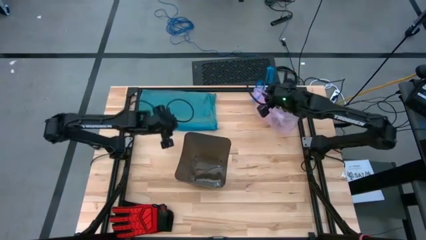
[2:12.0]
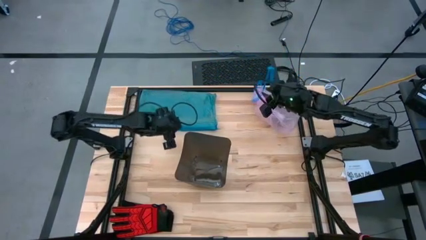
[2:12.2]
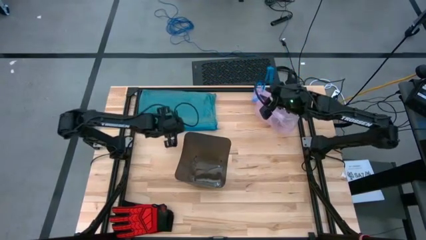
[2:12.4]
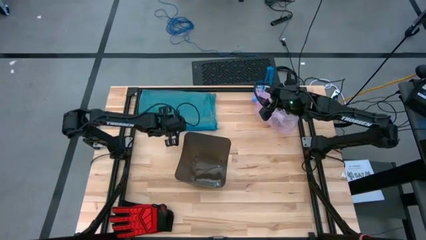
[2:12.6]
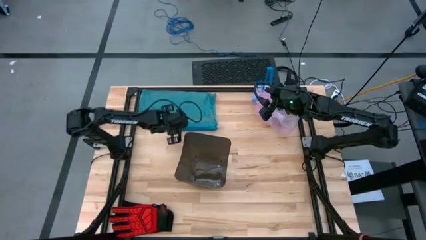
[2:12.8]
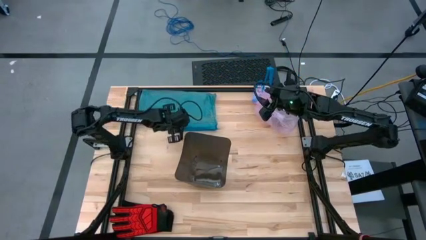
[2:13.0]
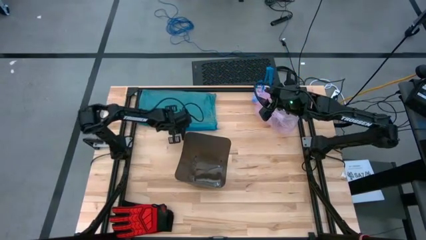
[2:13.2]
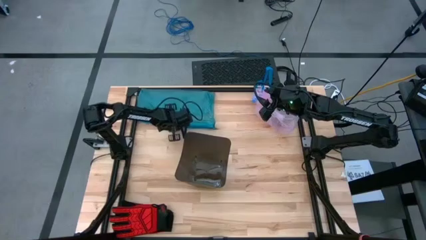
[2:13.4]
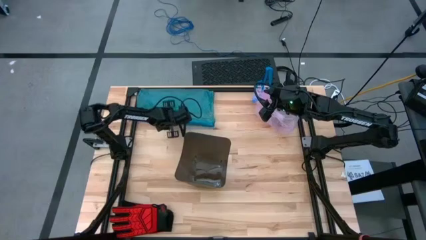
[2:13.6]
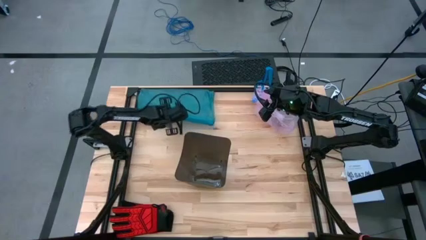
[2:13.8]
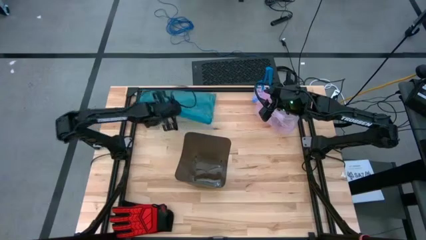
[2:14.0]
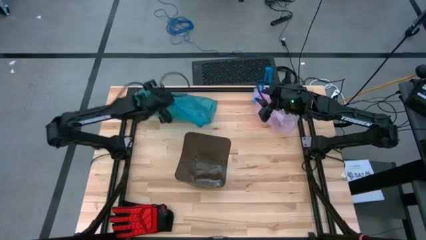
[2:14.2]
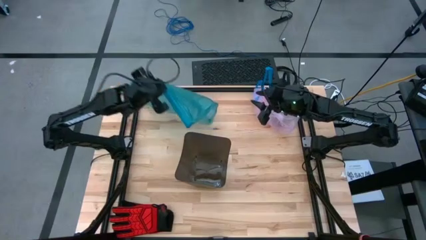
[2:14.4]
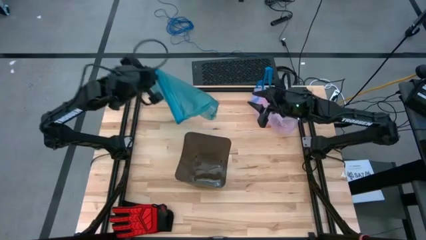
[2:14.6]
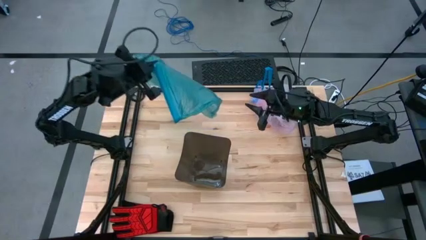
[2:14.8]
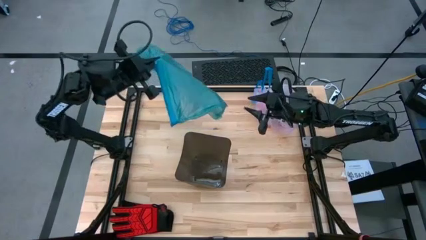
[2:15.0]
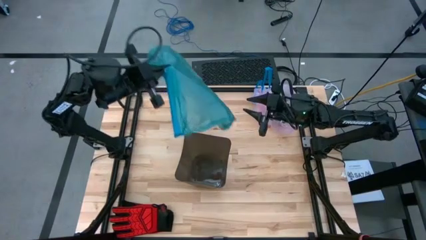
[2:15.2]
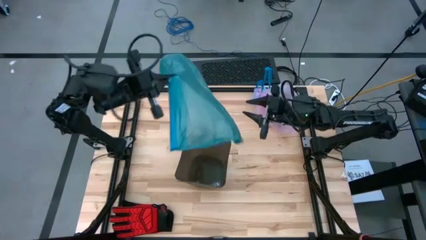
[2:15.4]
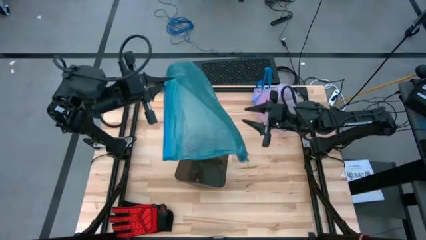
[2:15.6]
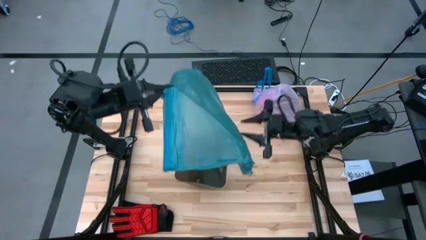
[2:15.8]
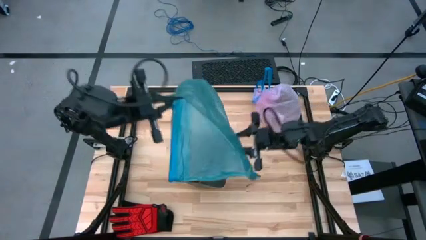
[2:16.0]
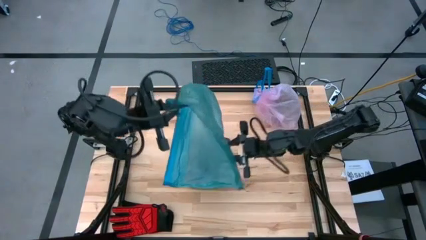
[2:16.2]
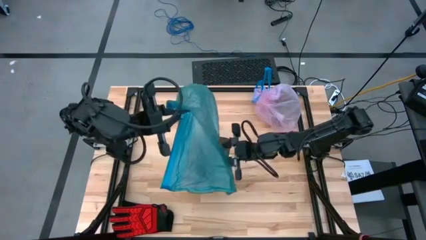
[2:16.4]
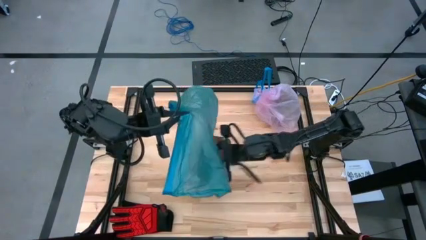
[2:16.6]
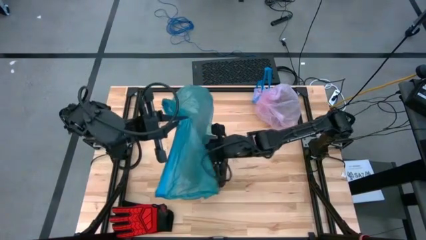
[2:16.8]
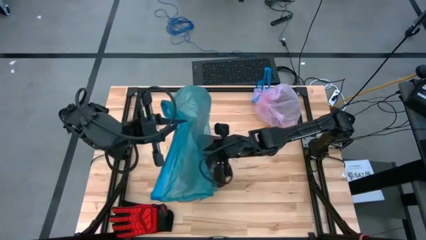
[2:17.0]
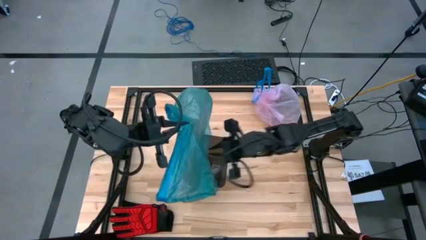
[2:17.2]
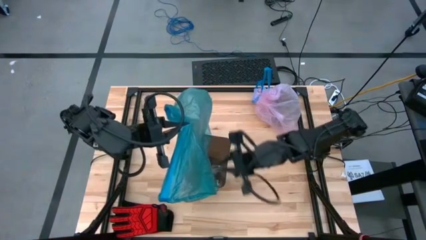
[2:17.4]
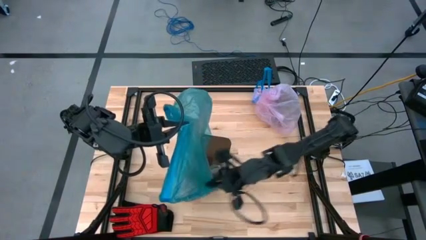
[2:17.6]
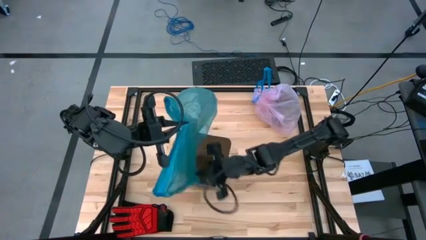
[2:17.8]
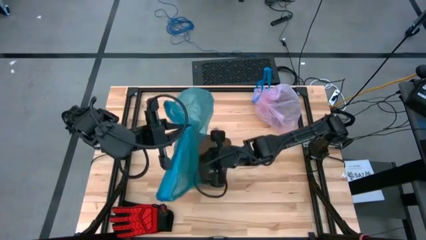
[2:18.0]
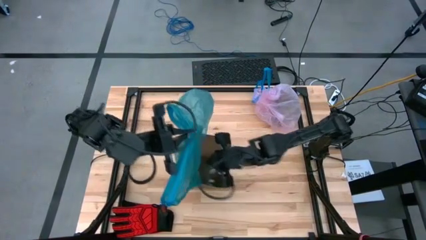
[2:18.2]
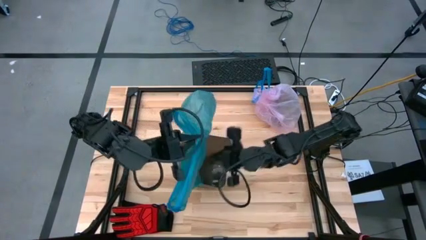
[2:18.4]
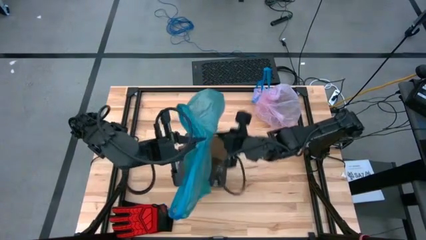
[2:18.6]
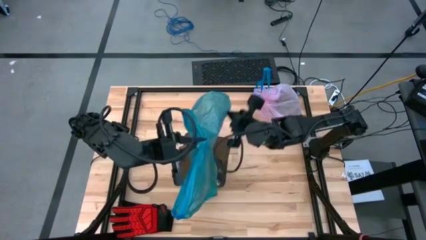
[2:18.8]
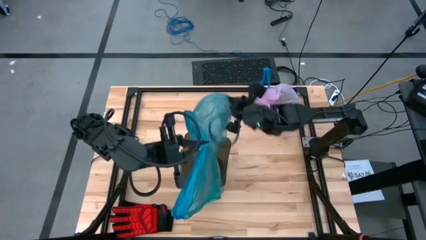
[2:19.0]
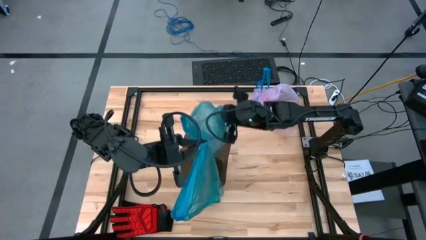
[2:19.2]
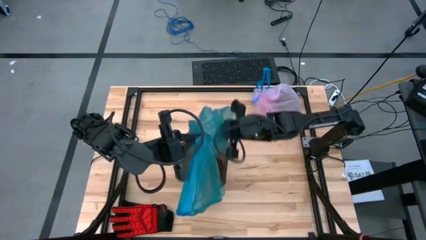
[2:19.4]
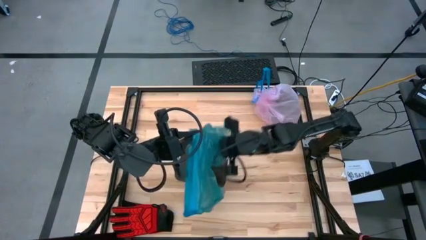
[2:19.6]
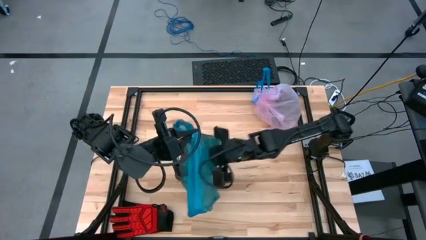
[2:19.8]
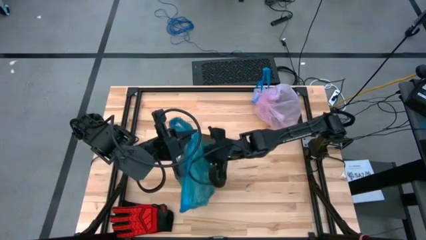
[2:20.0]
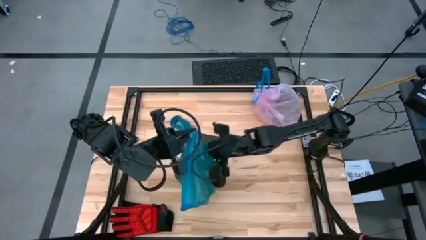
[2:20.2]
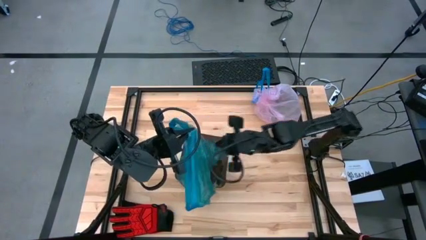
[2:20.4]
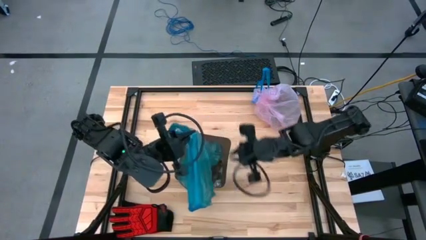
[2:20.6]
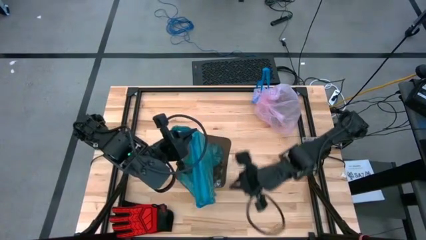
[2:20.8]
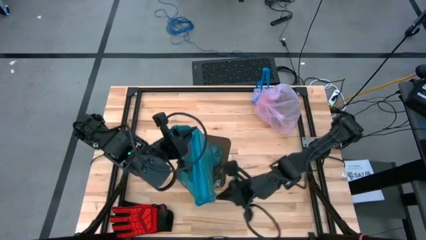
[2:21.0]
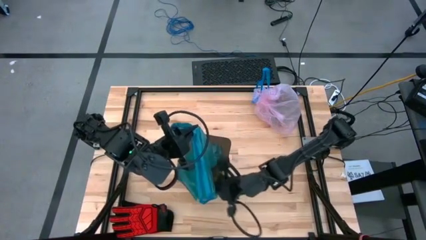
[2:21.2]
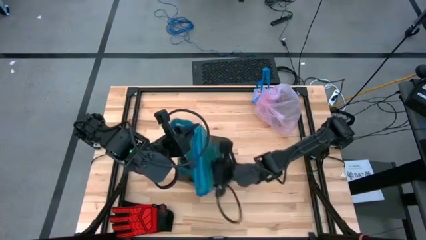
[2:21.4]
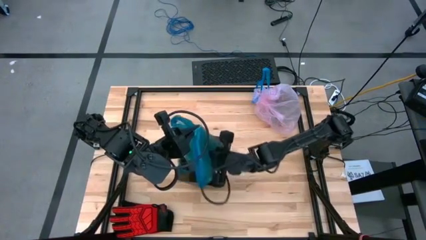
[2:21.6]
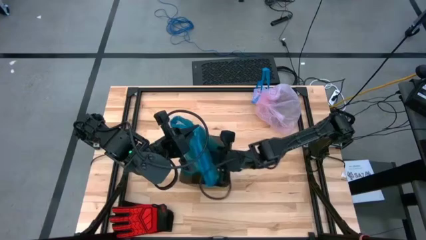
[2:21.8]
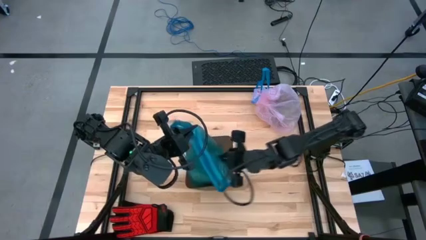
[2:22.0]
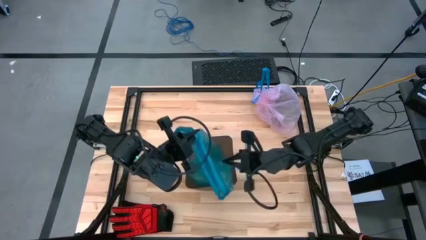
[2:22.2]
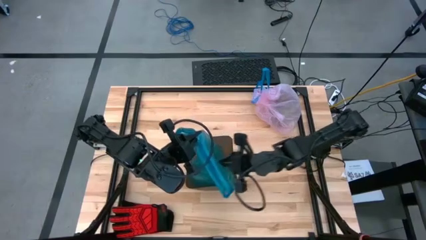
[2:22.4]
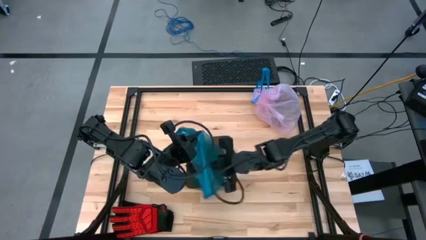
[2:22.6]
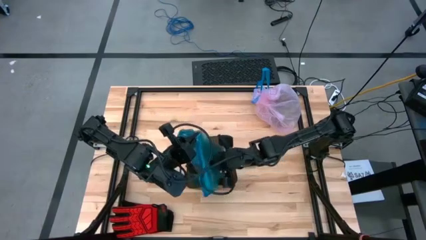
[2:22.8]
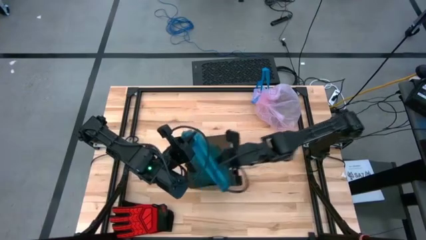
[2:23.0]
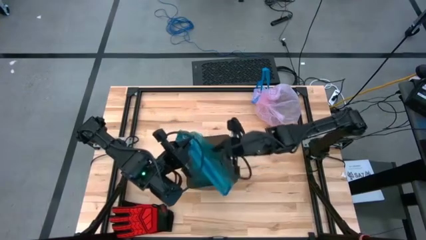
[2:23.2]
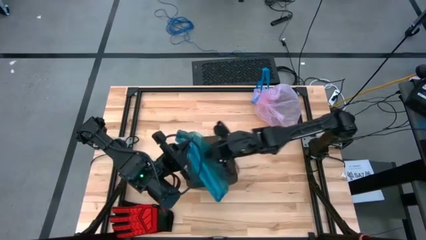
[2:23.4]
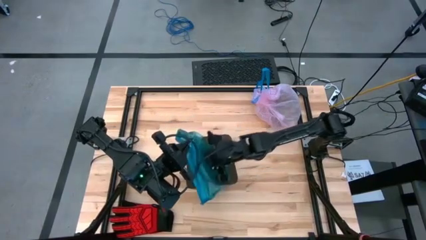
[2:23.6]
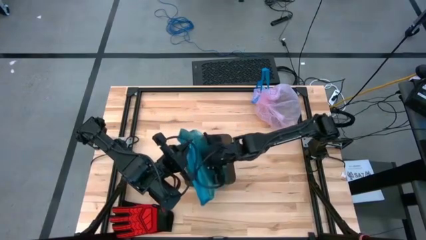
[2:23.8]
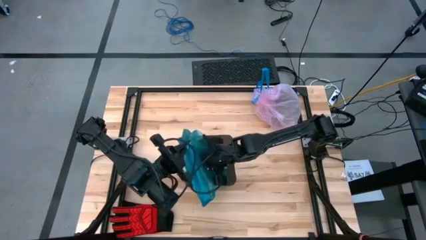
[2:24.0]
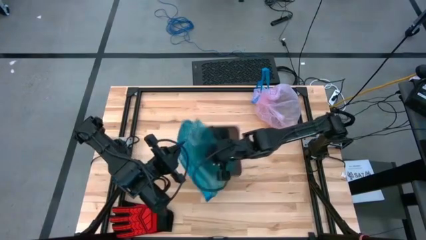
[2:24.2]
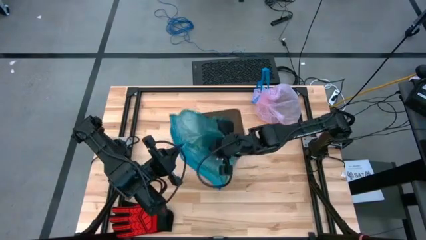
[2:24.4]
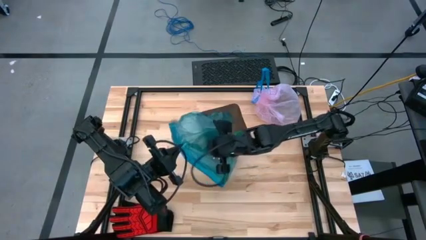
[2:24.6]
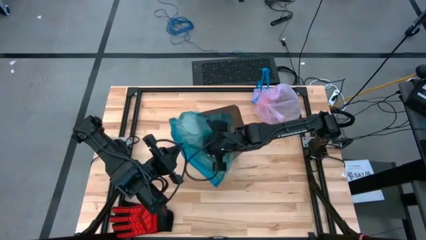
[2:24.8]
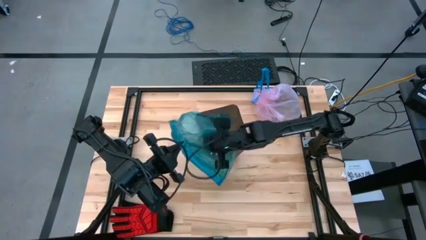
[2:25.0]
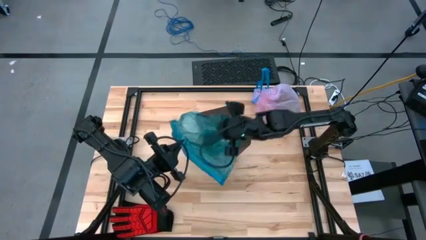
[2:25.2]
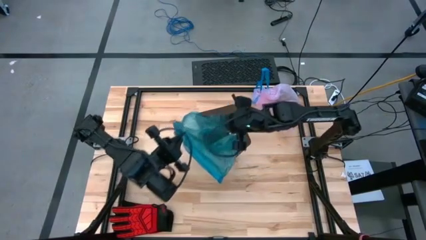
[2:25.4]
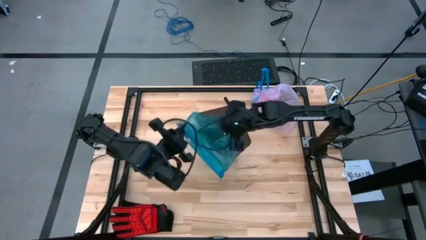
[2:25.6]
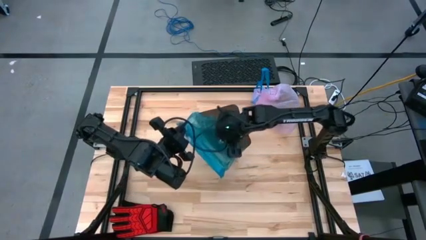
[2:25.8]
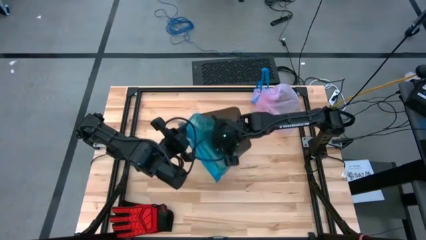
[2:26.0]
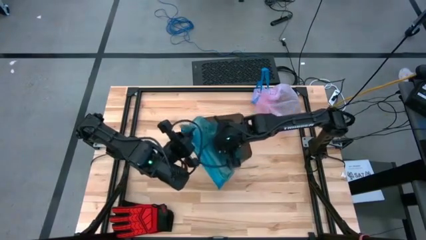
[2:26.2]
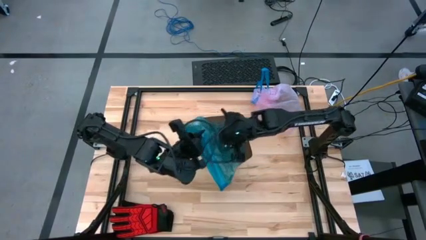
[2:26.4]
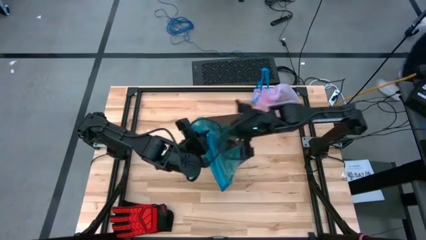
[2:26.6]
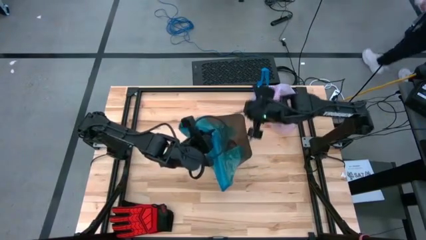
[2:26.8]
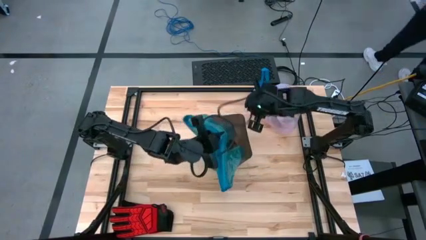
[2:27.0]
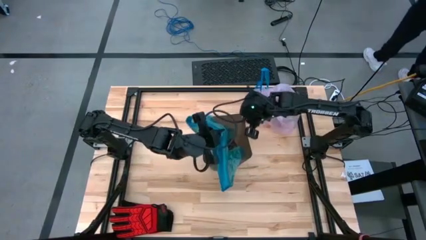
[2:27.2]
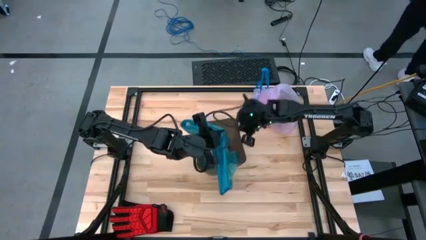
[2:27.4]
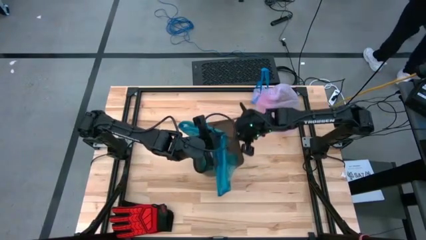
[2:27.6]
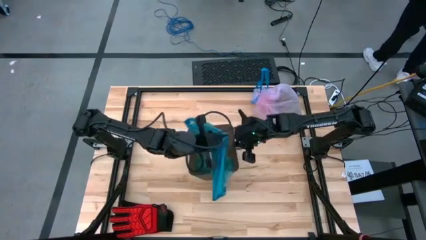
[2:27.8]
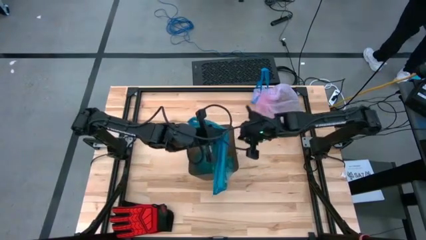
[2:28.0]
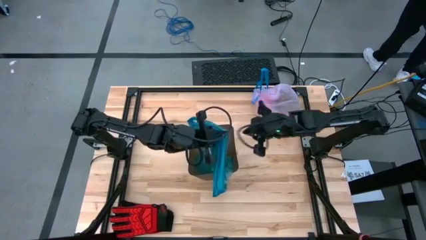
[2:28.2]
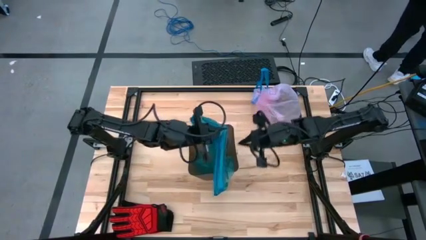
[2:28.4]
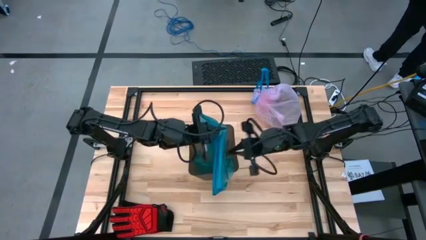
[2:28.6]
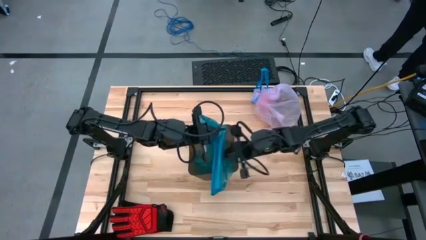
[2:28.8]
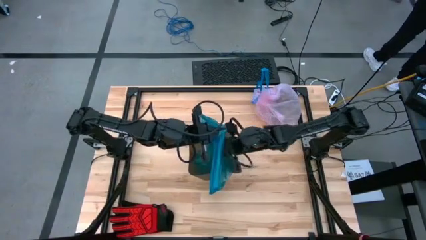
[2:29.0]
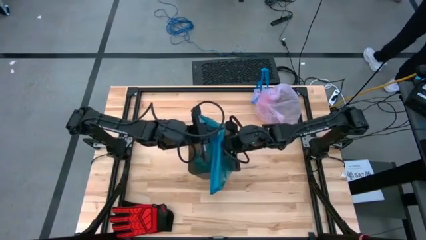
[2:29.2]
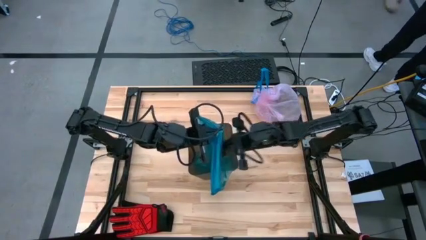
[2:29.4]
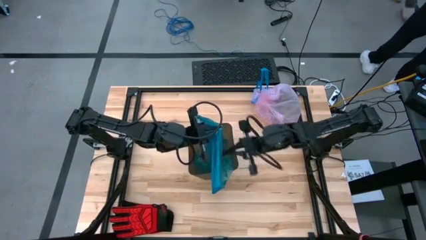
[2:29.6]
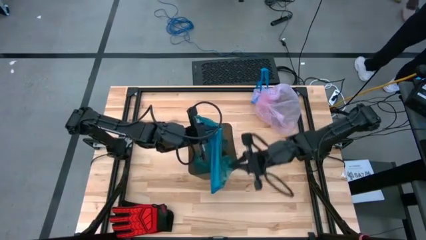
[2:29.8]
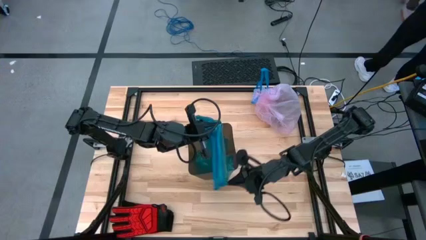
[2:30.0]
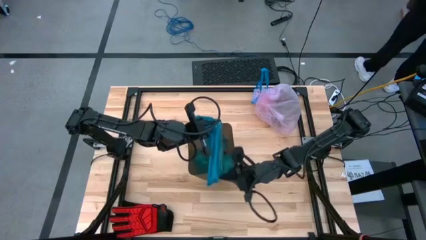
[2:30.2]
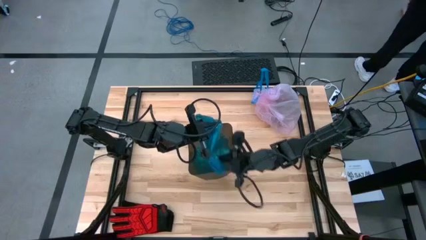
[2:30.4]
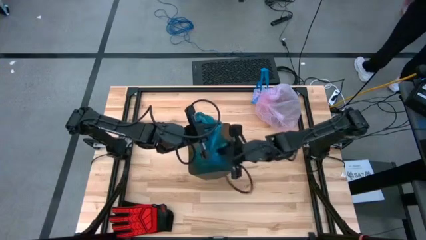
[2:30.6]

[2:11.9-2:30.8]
Task: place trash/remove bag and relplace
Insert a new trash bag into the trash bin
